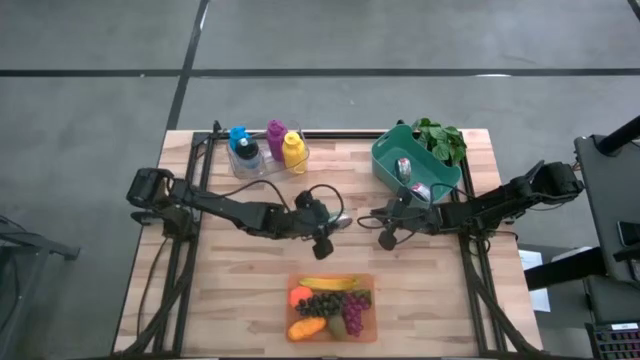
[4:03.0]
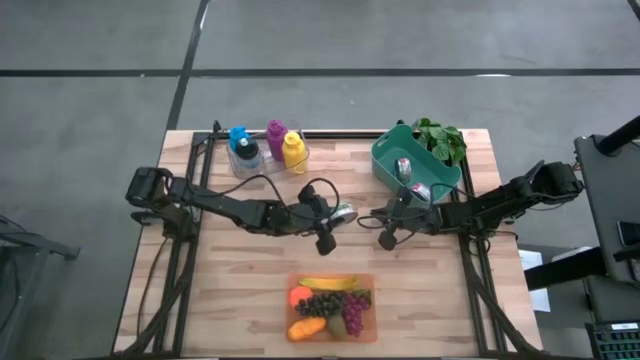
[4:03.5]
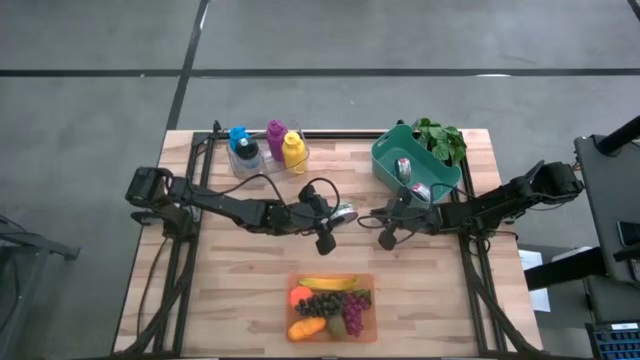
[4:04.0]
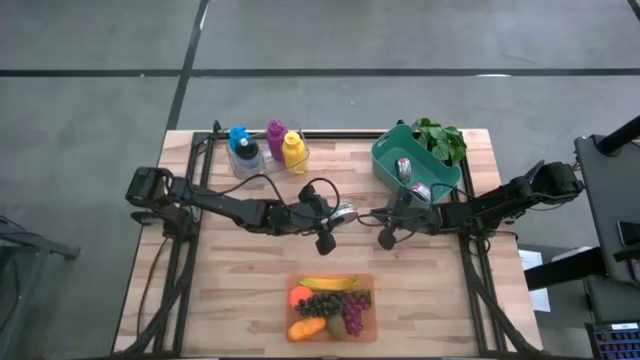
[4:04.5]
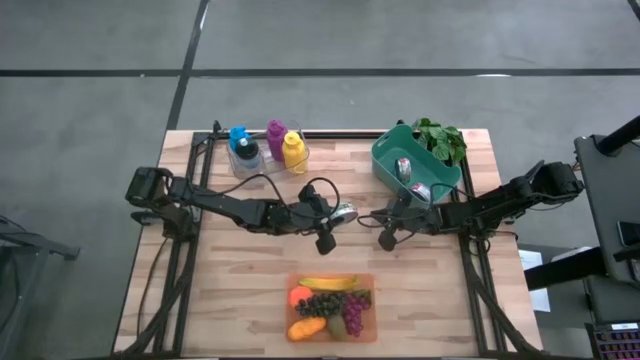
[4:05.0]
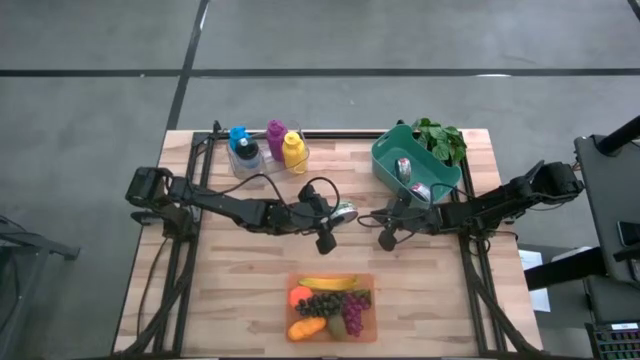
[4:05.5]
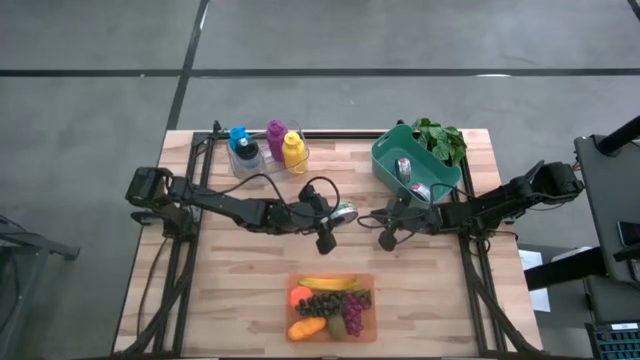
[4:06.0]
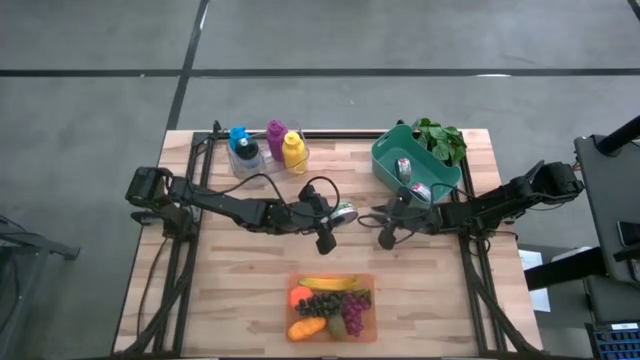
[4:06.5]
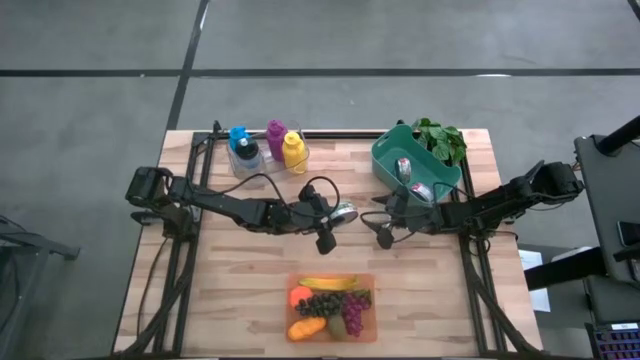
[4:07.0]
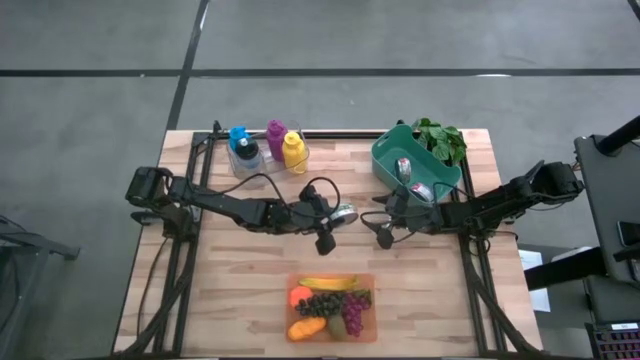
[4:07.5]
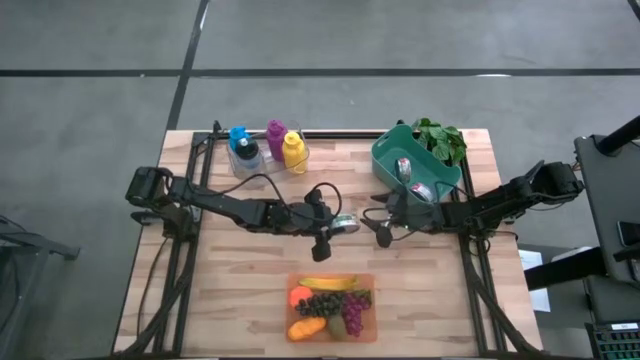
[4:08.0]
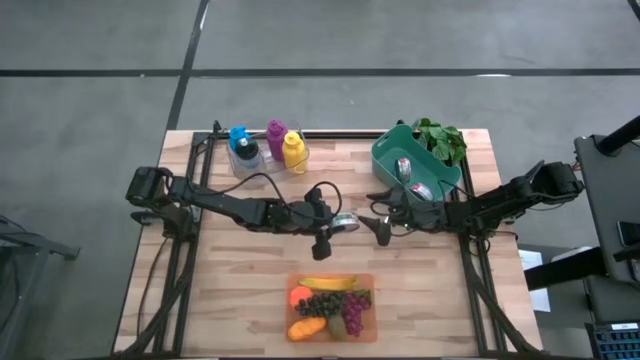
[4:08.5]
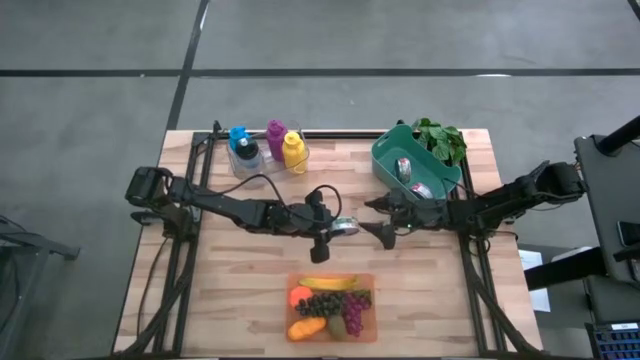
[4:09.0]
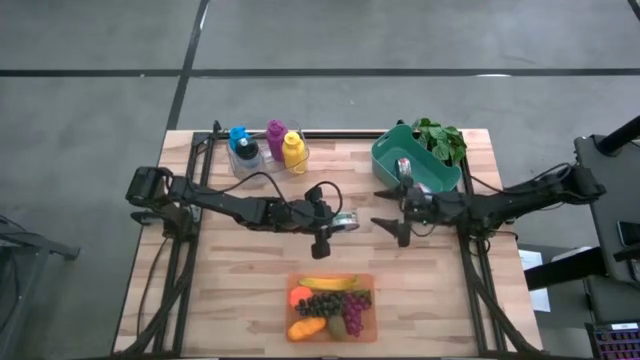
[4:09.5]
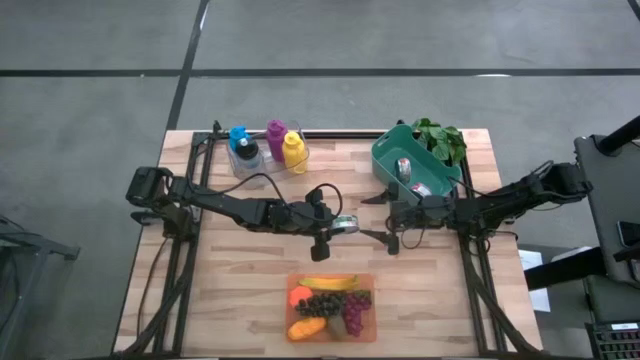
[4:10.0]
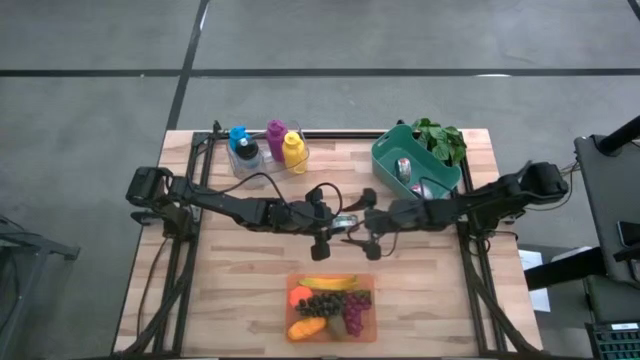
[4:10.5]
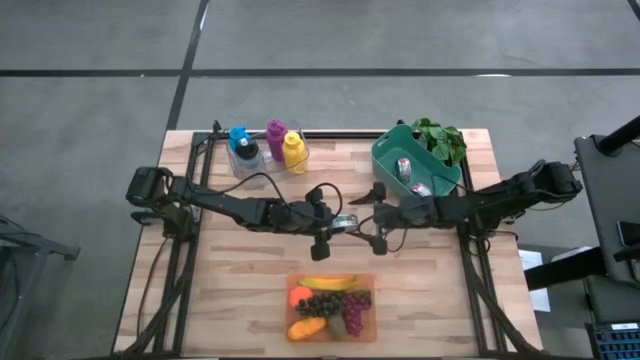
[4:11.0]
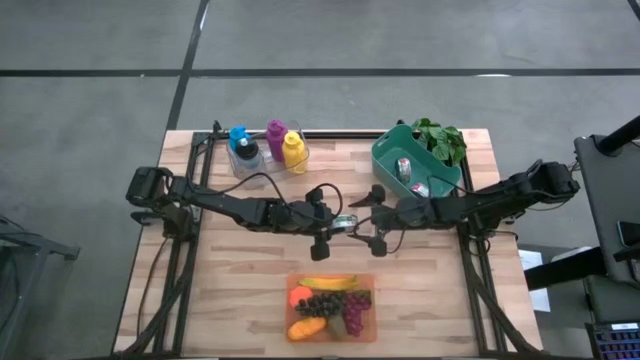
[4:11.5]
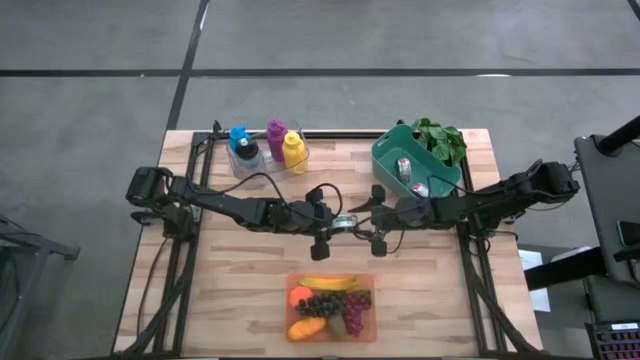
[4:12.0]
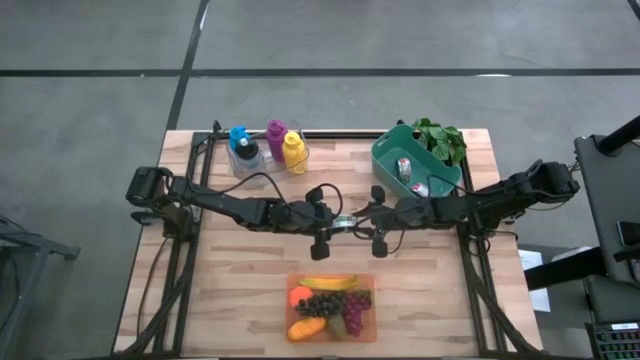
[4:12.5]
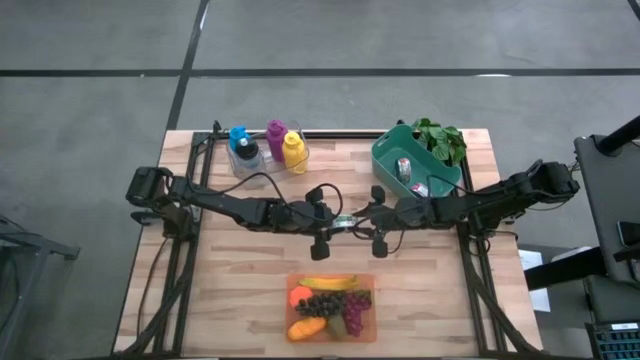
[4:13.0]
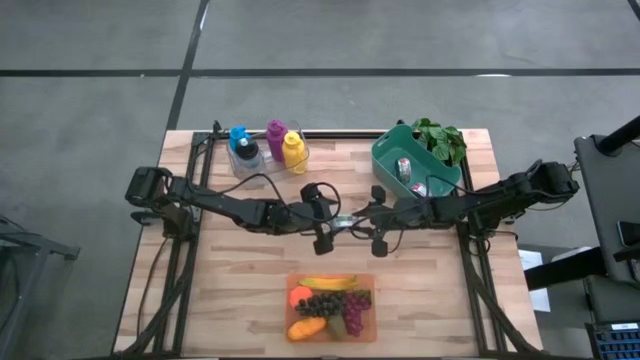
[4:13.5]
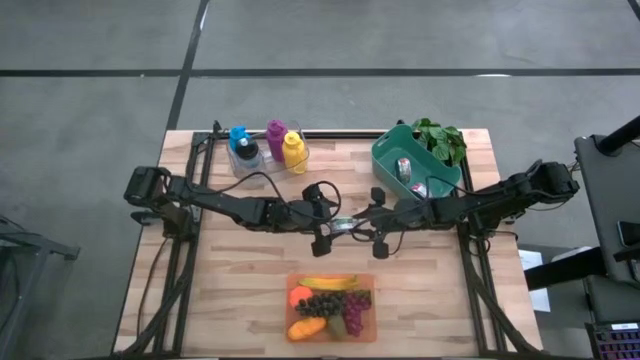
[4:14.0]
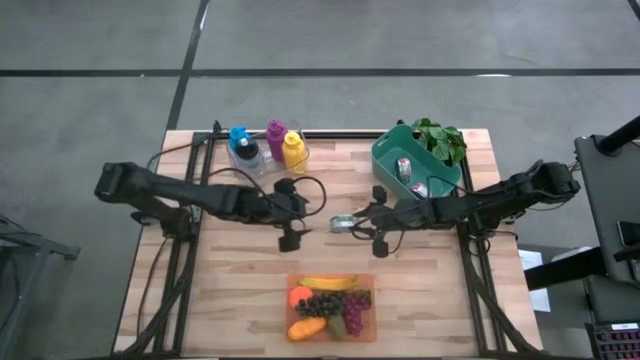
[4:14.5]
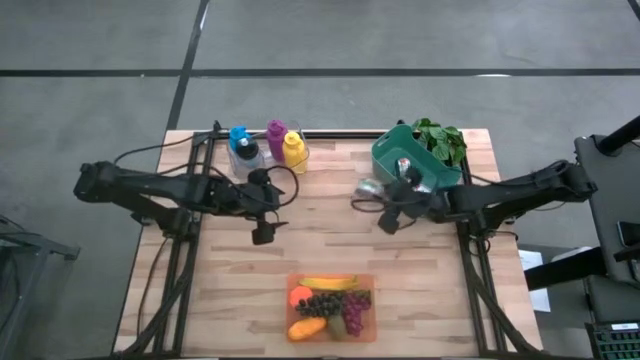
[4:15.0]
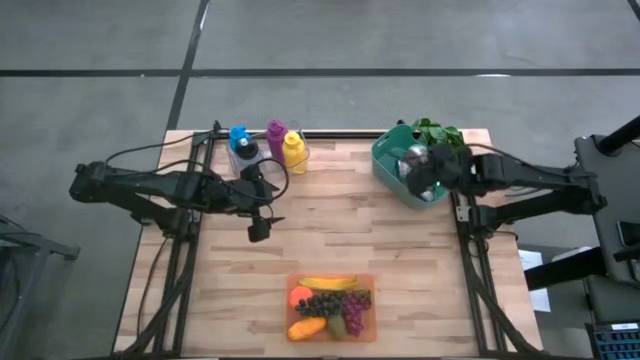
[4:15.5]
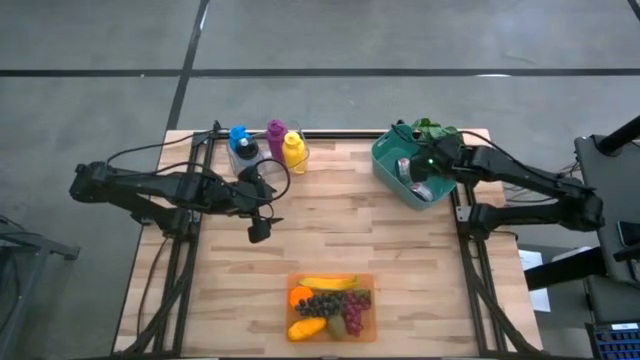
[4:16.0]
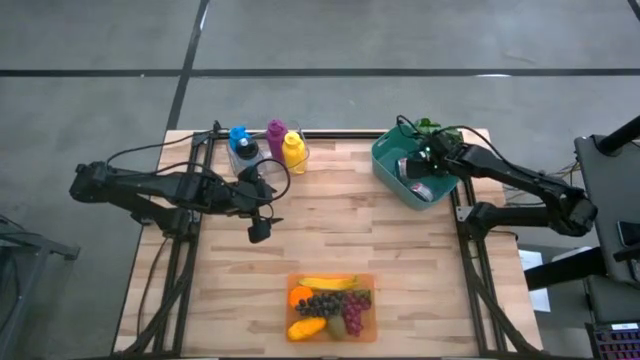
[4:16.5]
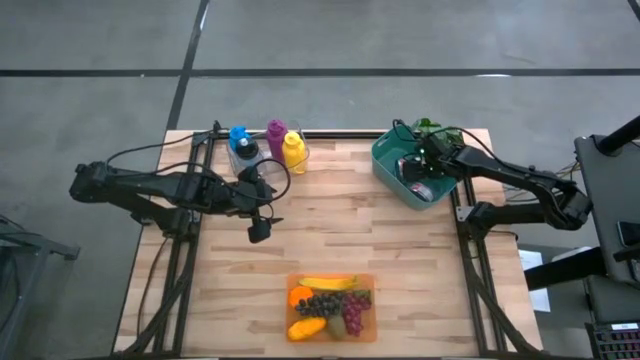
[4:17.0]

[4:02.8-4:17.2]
Task: Pick & Place Food Item
Put the green and white tuna can into the green bin

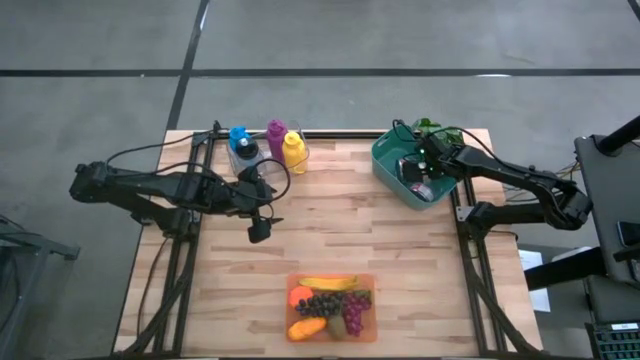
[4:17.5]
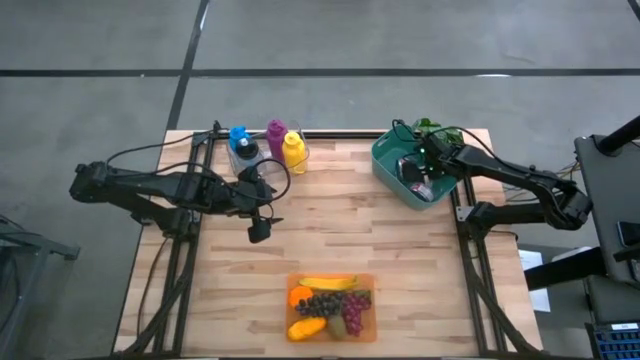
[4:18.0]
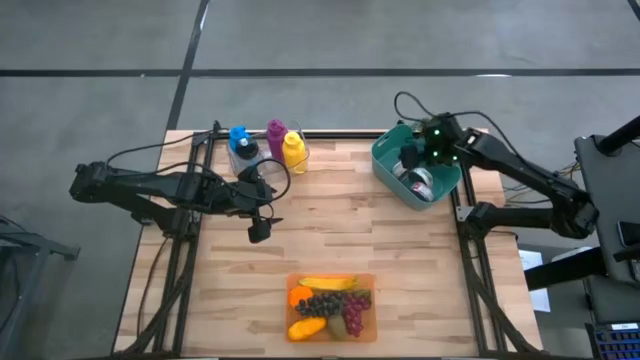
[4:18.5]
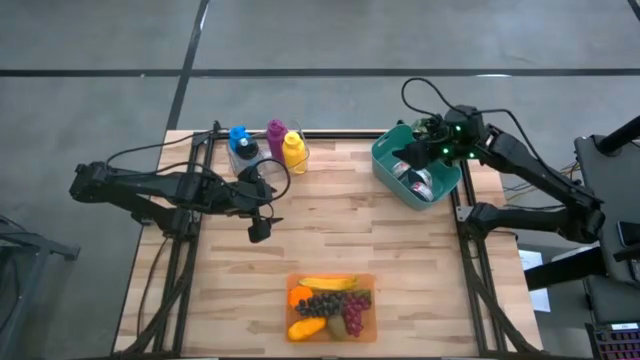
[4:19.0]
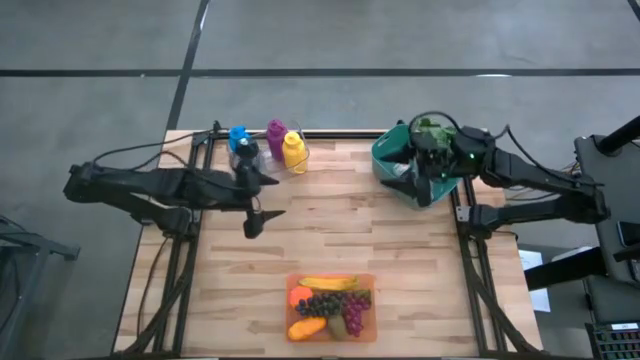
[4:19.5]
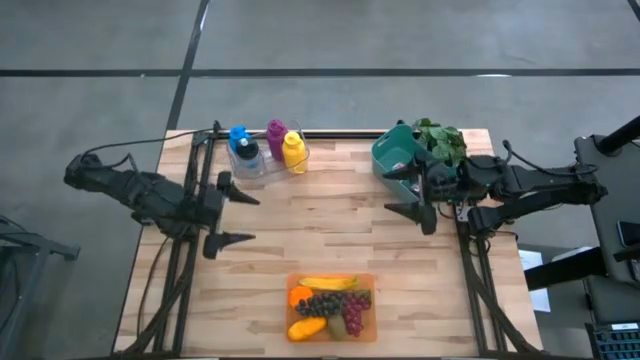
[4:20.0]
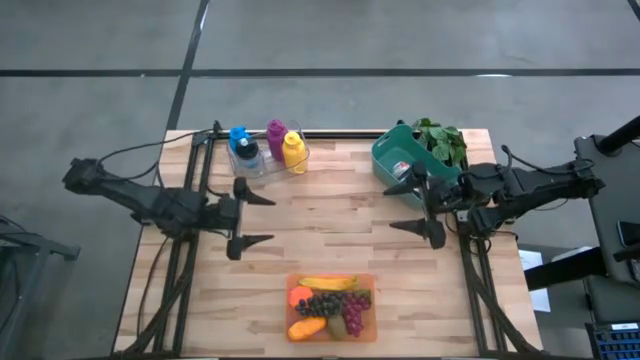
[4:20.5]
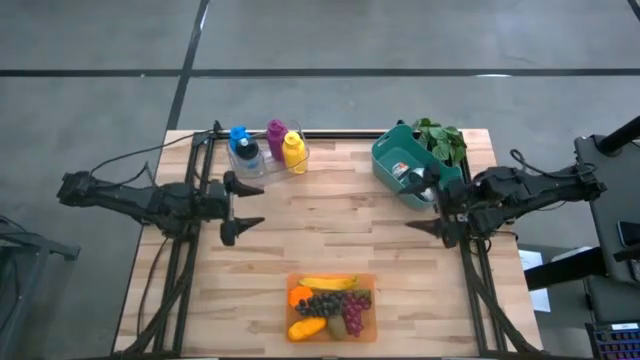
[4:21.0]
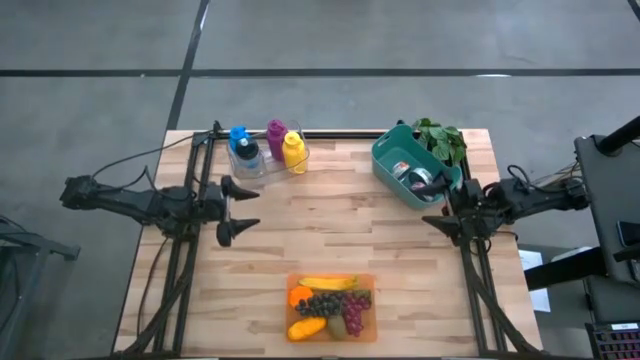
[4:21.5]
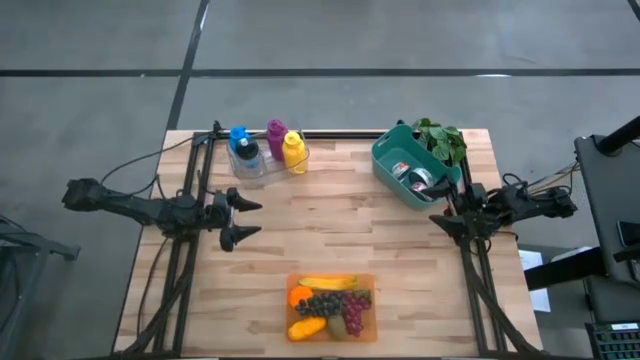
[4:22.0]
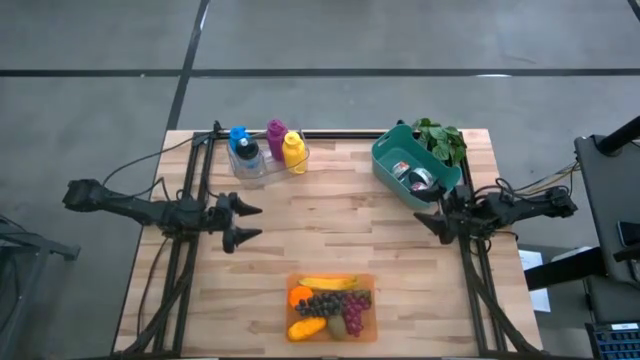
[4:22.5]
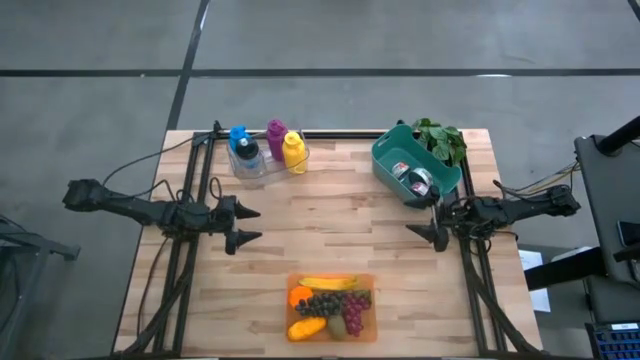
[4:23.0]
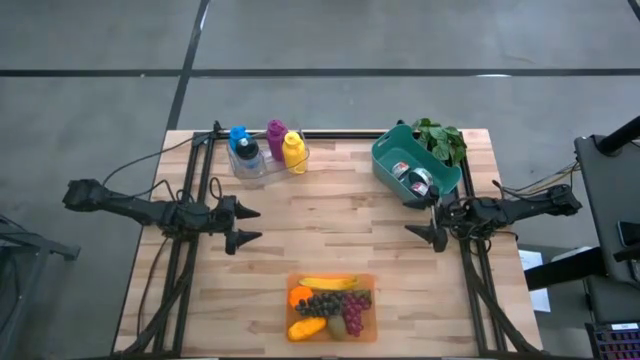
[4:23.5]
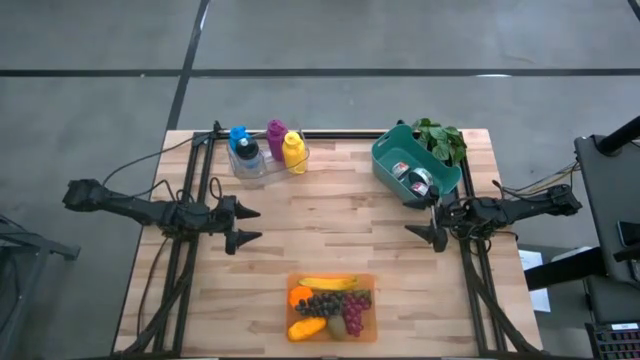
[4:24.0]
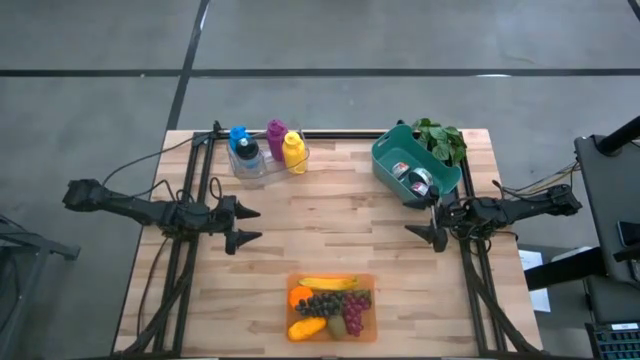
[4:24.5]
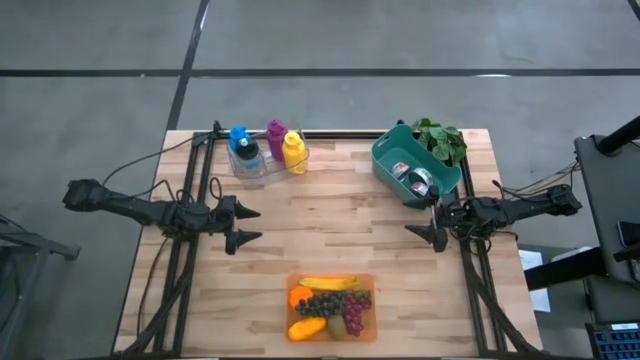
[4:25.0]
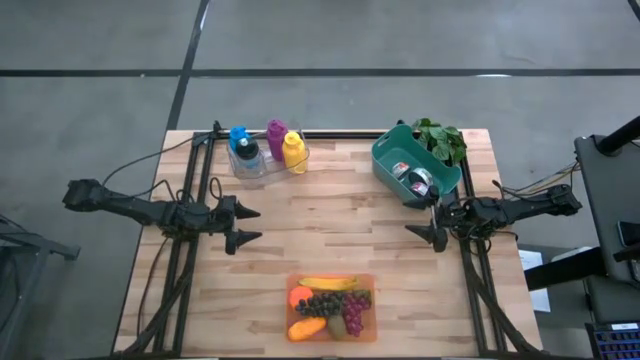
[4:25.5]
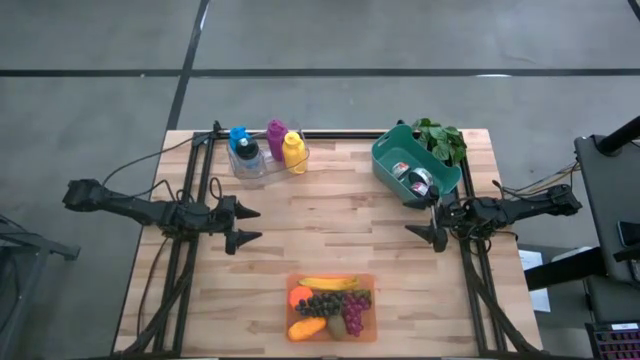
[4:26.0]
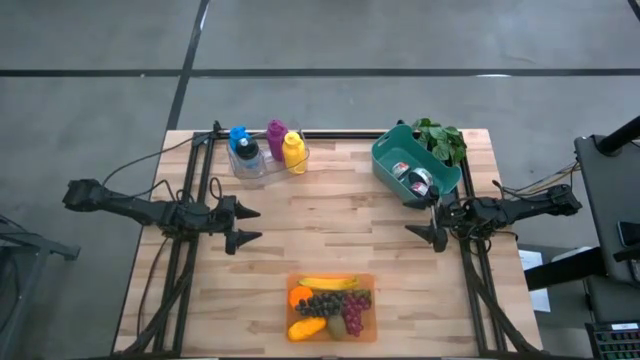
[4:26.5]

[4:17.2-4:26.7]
Return to Home Position
